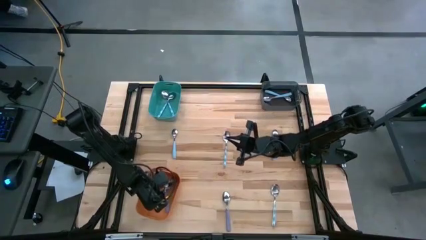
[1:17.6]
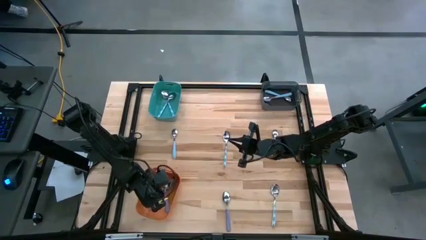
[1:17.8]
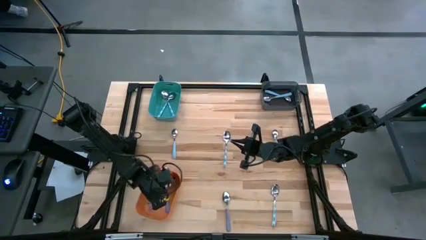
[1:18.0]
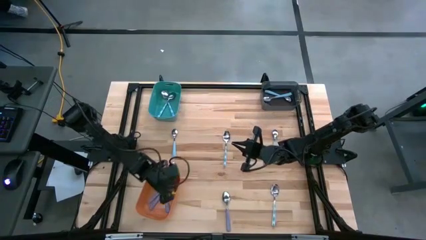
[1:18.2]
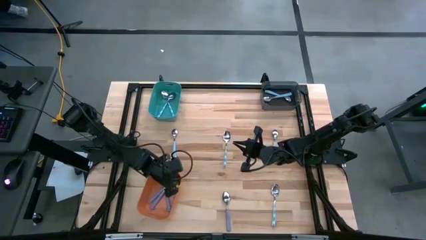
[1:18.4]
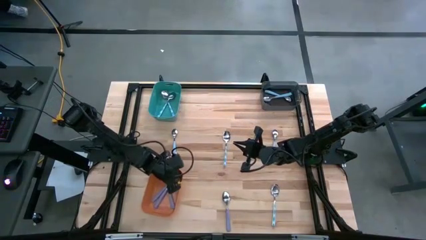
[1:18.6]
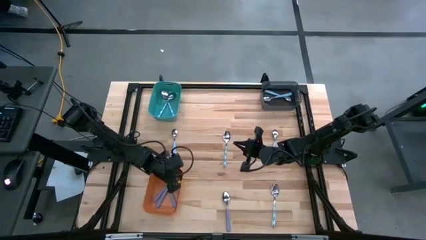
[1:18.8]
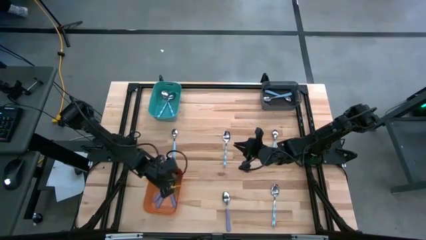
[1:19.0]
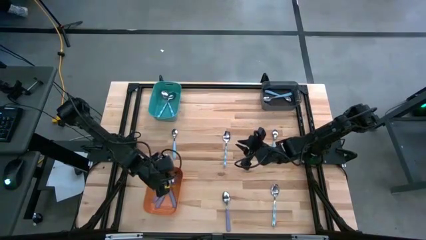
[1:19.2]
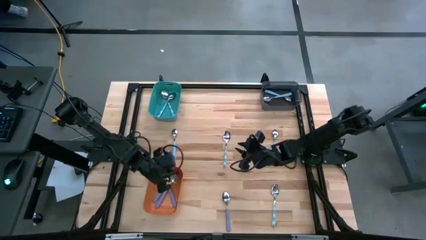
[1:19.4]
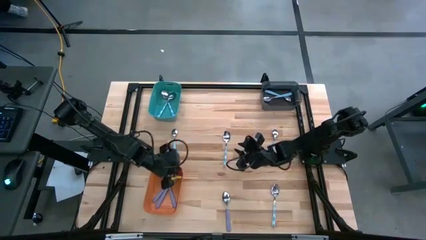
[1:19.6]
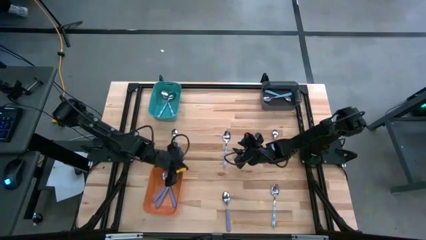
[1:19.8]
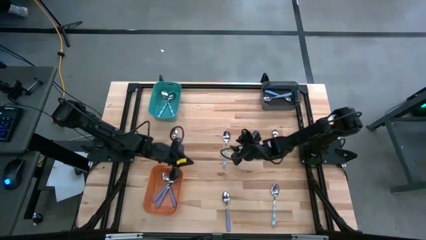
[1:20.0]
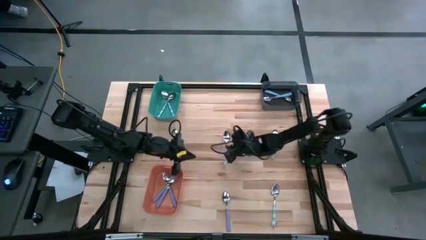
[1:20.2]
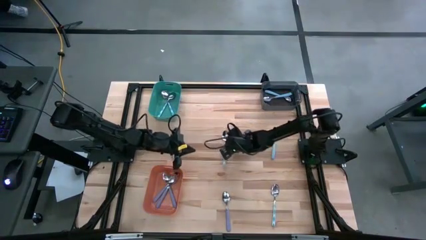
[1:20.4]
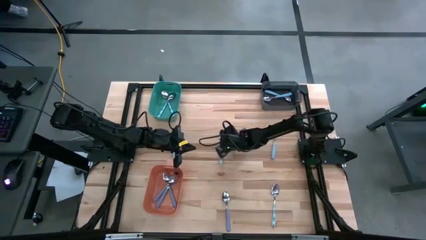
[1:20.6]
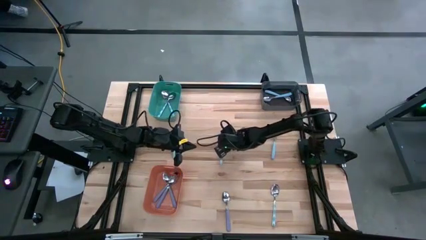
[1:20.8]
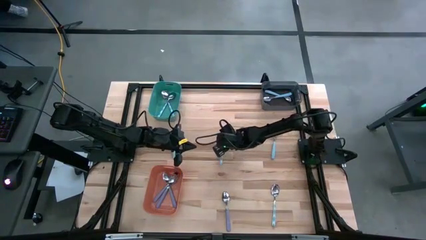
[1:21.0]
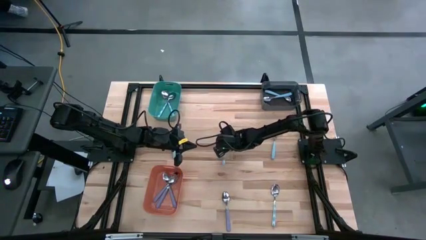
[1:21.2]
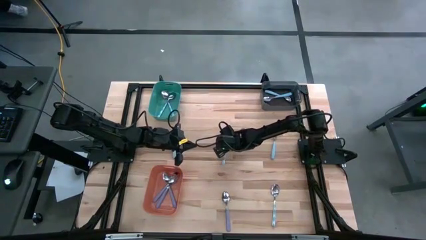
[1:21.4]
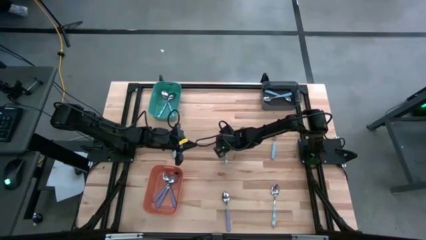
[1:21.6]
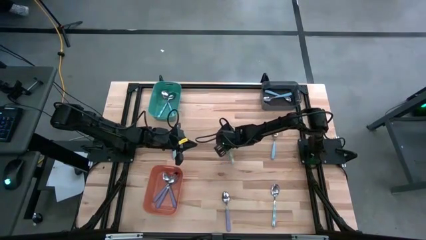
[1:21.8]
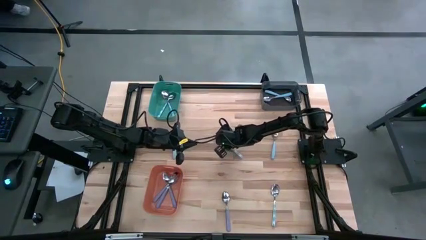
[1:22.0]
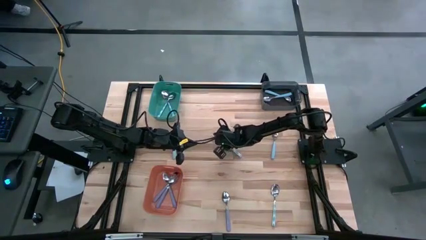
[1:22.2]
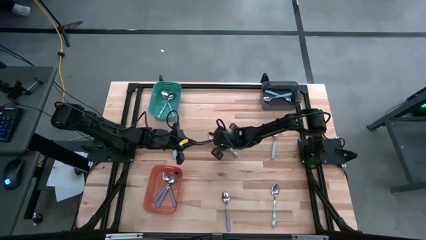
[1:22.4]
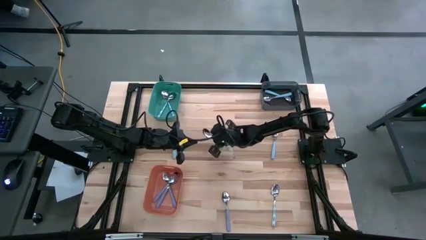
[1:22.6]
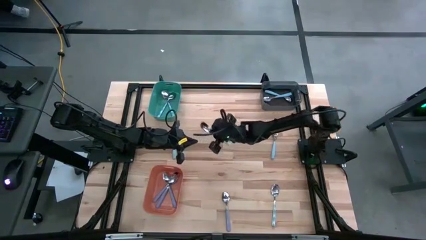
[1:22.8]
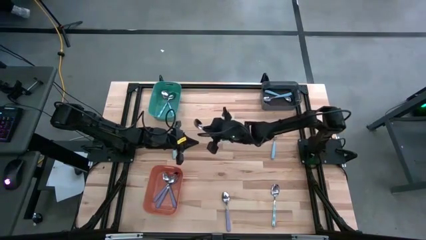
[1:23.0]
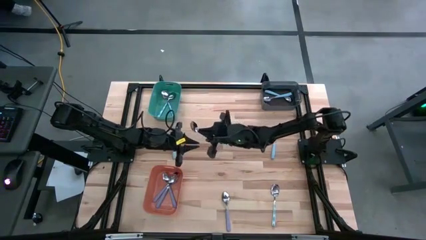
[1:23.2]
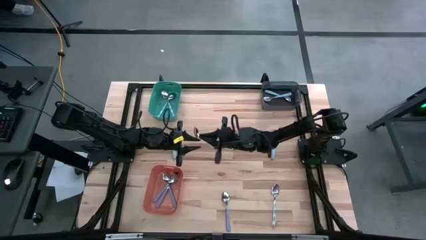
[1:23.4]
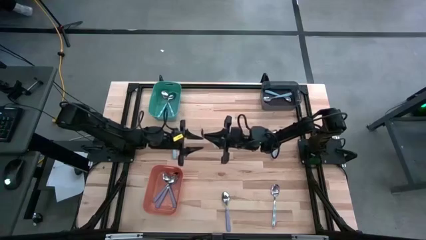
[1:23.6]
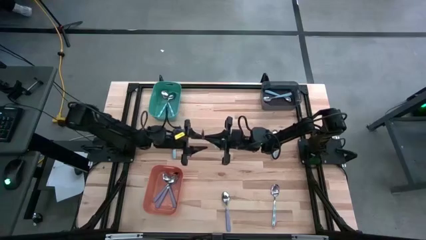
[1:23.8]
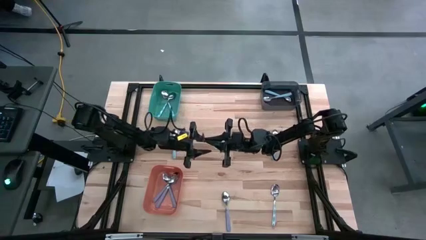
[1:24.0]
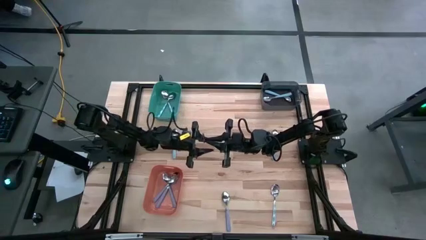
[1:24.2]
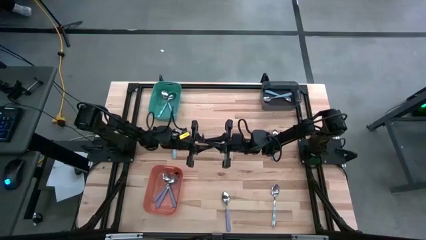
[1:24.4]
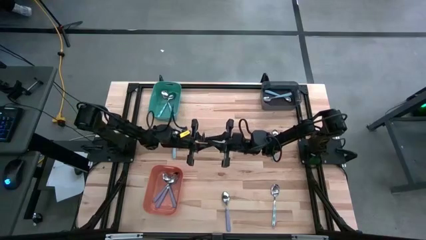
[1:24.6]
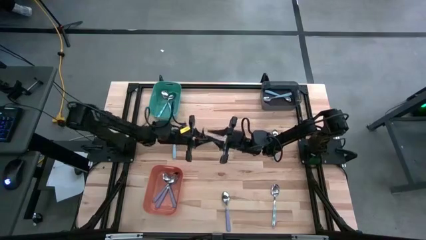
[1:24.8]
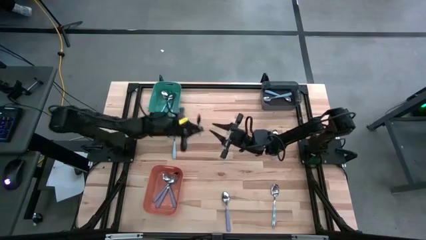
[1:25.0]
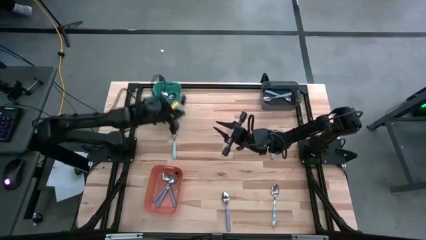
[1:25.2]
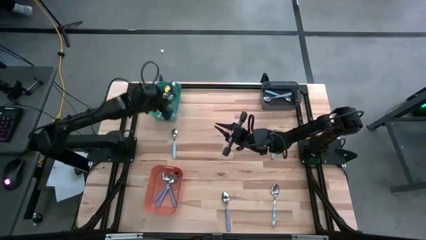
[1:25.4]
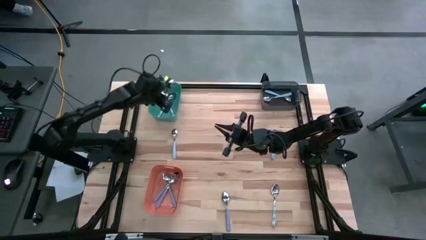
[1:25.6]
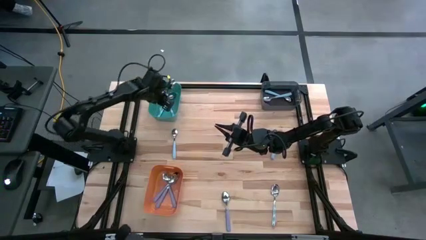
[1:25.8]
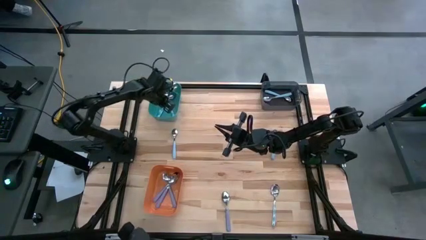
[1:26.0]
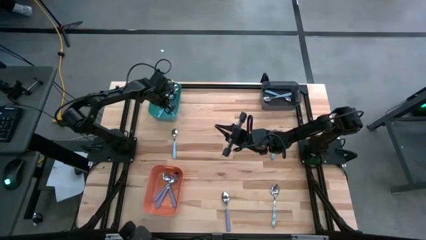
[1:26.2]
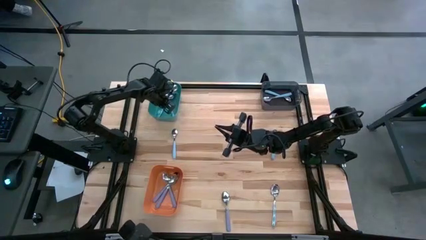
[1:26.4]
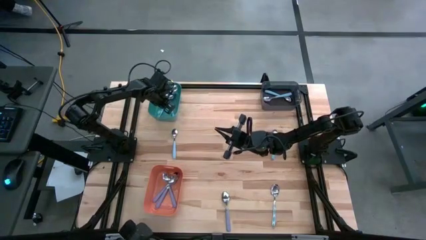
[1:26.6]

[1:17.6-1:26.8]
Task: Sort silverware by color (type)
Put the blue spoon into the green bin

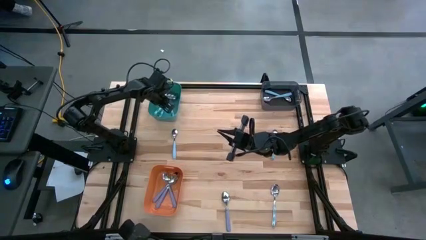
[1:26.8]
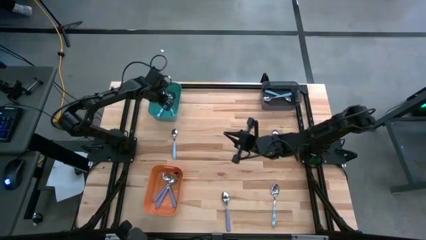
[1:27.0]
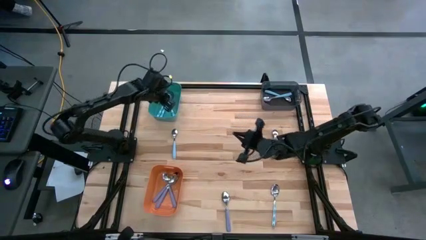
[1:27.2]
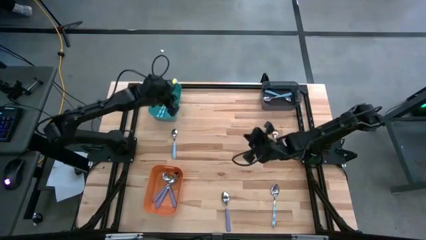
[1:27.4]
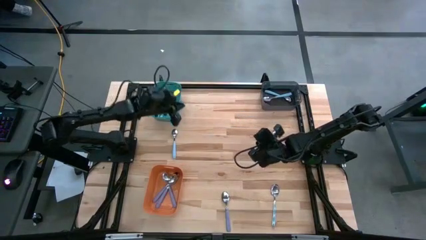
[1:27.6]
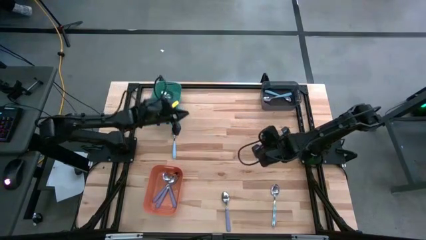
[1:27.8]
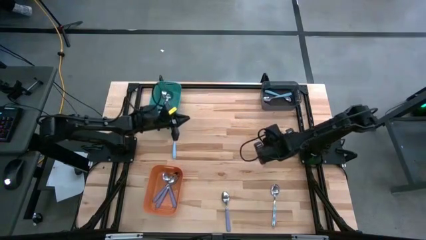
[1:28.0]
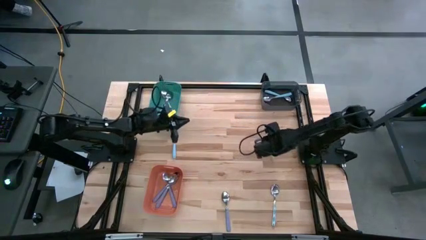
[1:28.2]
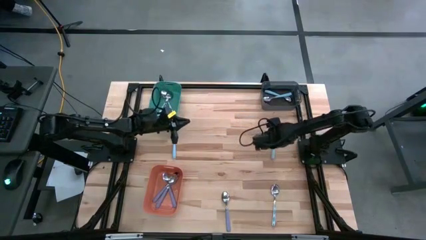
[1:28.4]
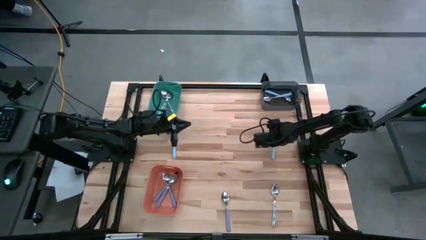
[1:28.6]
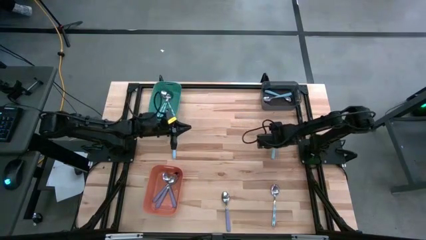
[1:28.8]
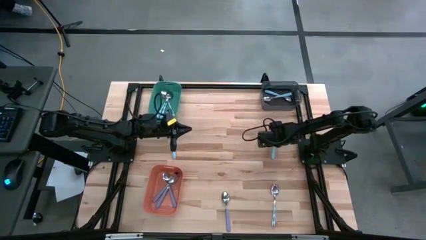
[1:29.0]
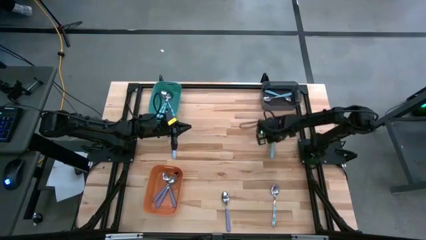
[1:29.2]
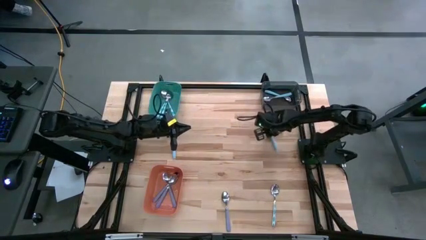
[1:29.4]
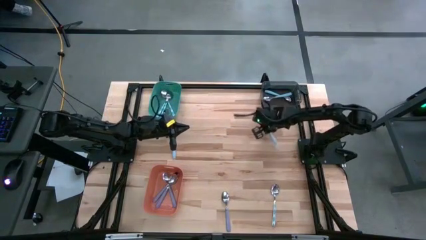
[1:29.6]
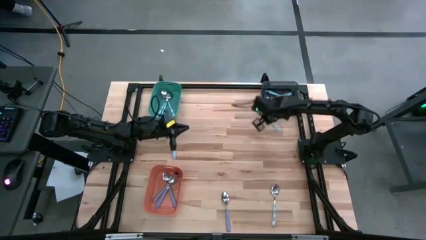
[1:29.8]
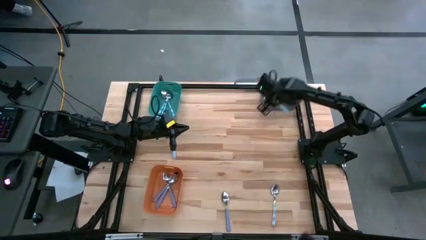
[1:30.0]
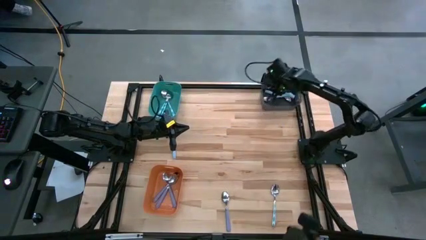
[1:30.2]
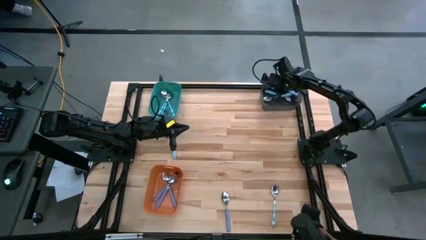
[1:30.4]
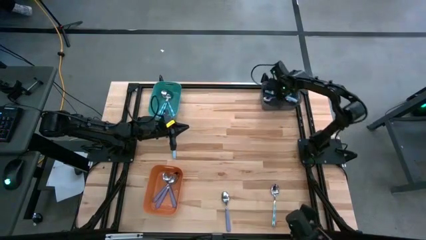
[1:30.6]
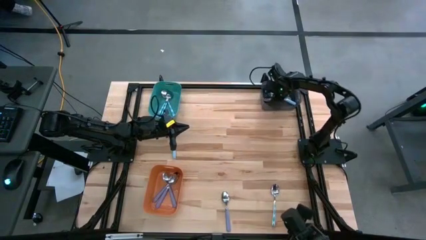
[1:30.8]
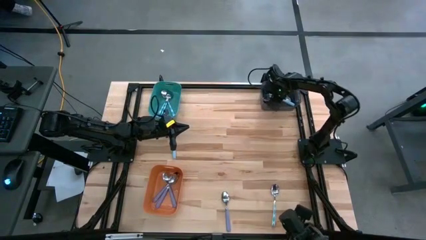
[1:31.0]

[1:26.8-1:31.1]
Put the light blue spoon into the black bin

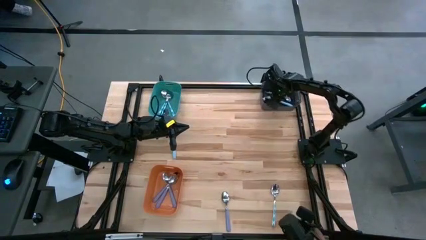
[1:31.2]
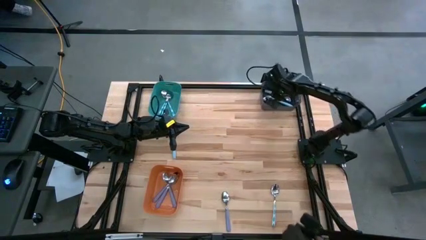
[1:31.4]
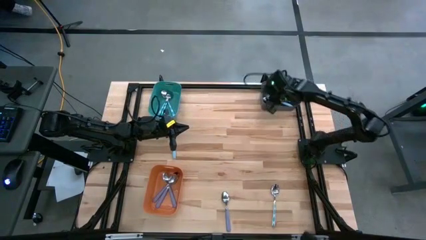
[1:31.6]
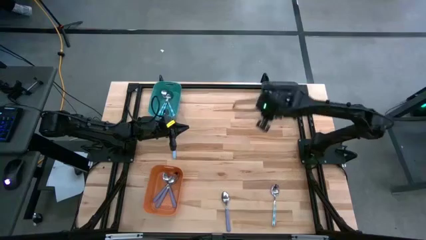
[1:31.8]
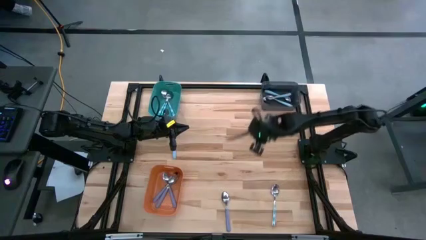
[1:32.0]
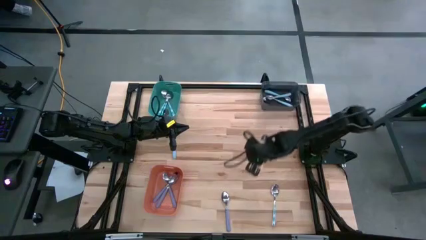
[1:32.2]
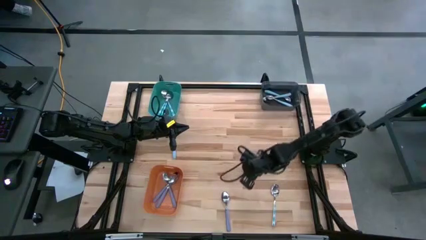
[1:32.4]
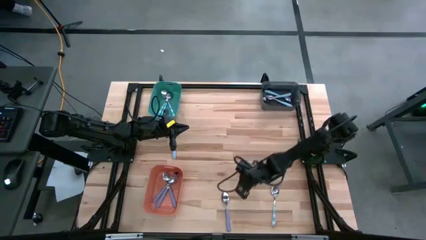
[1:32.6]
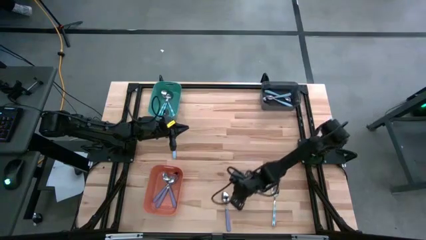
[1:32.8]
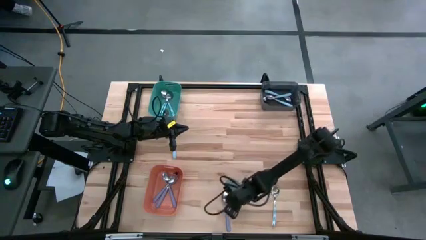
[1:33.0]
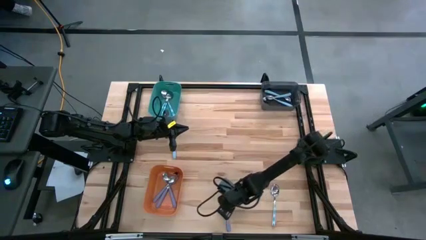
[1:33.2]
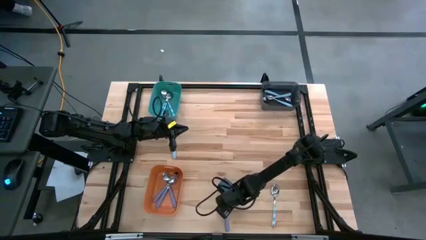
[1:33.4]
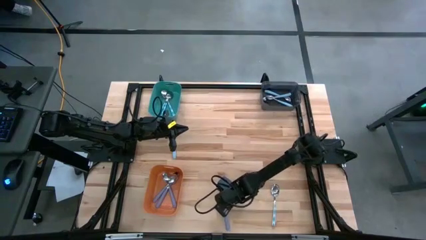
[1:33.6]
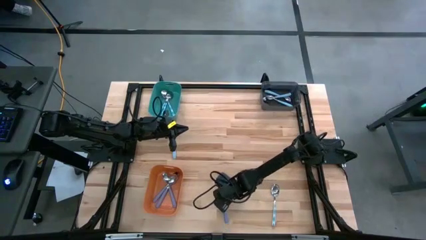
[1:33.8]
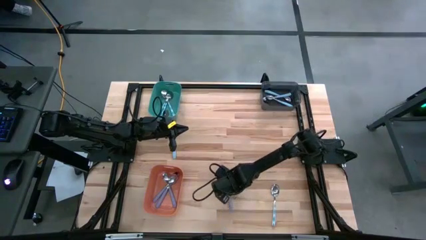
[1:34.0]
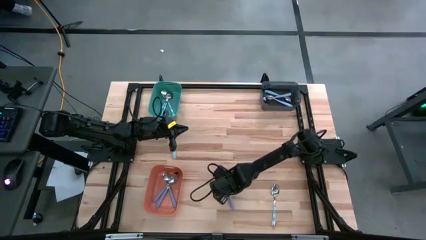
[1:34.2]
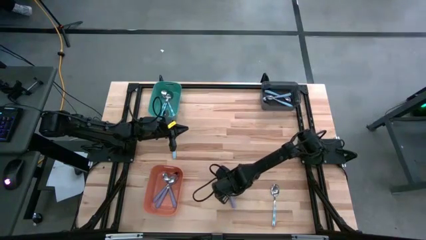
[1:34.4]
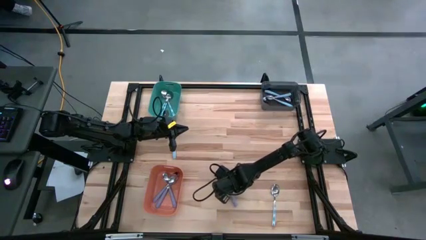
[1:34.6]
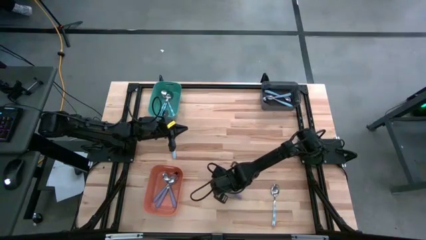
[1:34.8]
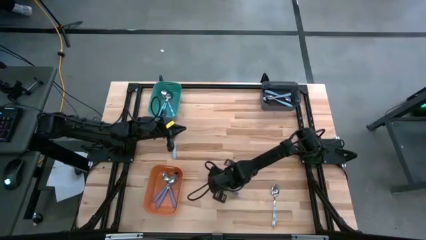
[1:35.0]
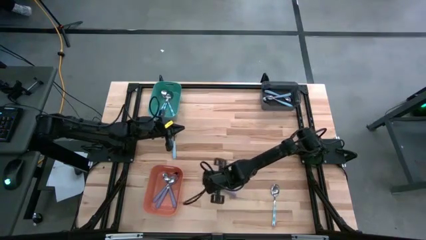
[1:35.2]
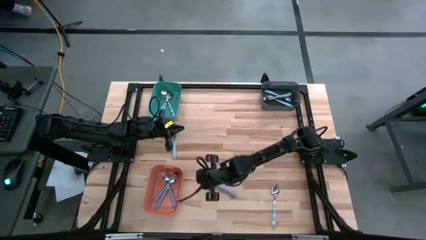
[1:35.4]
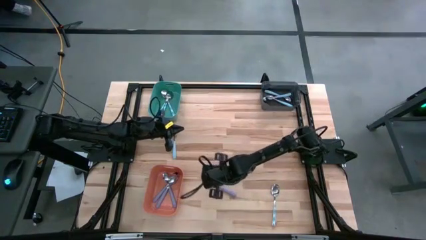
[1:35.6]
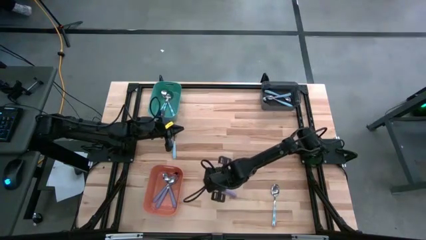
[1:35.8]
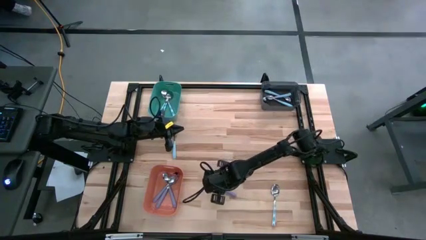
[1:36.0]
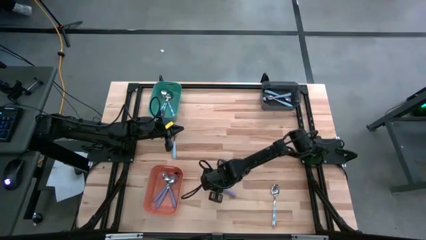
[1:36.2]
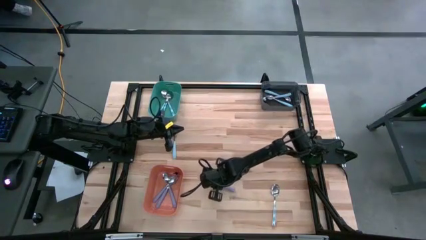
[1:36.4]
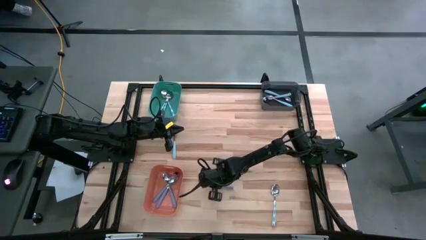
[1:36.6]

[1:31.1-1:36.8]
Put the violet spoon into the orange bin
